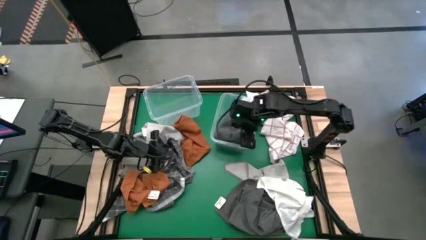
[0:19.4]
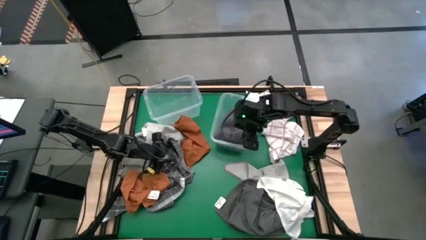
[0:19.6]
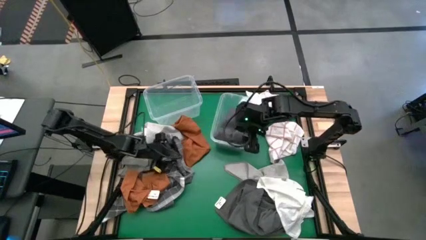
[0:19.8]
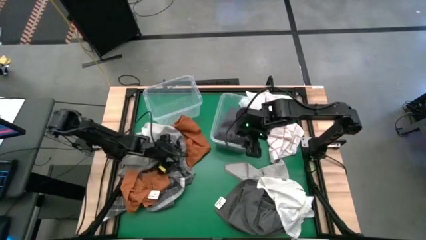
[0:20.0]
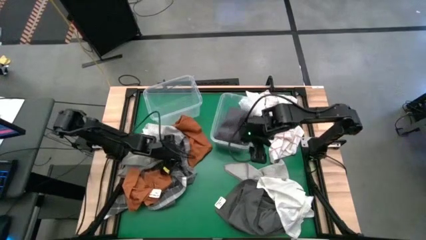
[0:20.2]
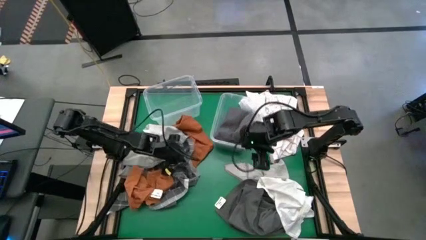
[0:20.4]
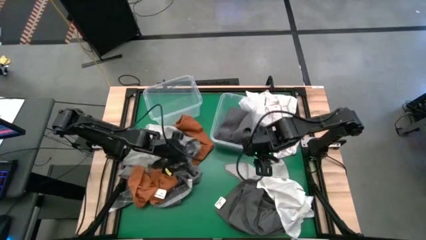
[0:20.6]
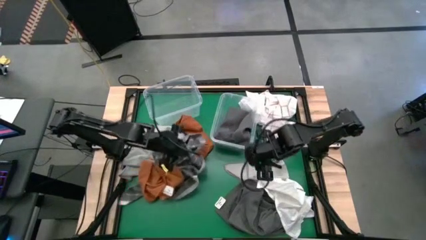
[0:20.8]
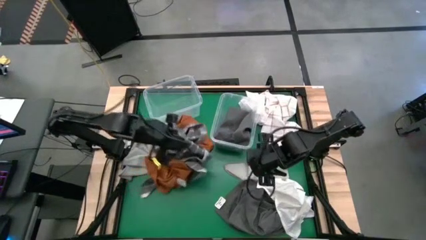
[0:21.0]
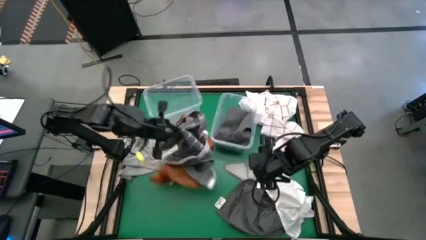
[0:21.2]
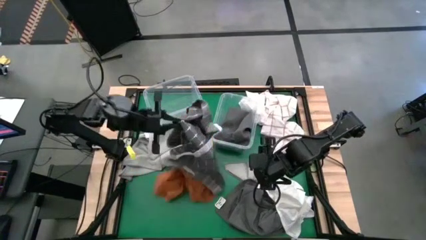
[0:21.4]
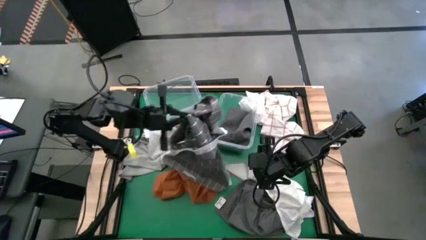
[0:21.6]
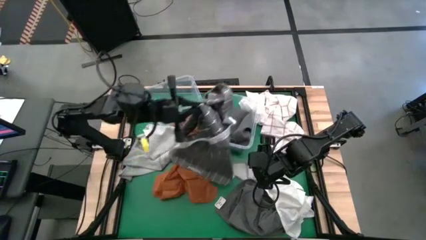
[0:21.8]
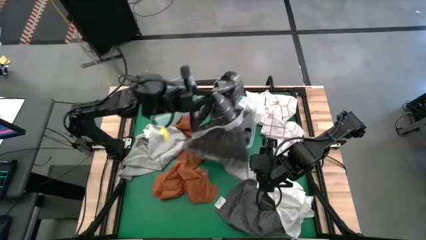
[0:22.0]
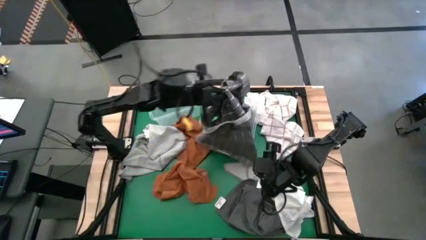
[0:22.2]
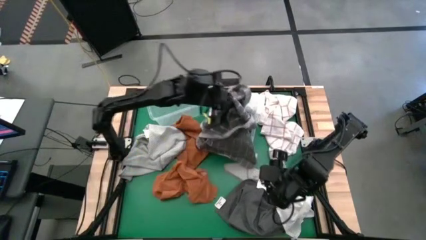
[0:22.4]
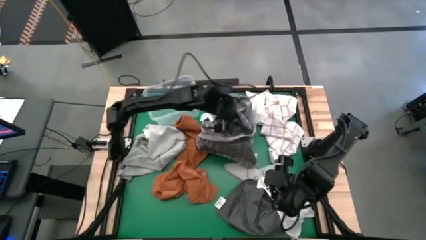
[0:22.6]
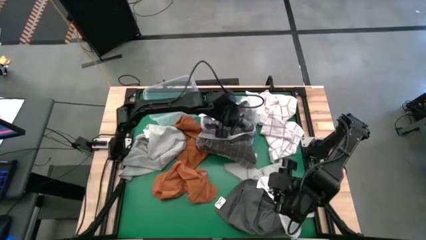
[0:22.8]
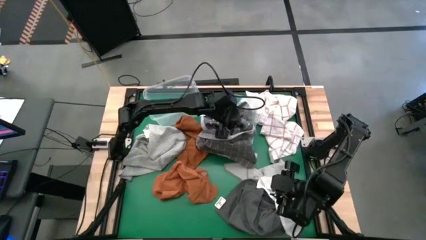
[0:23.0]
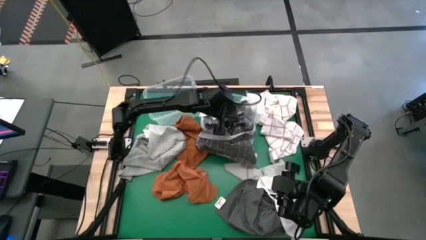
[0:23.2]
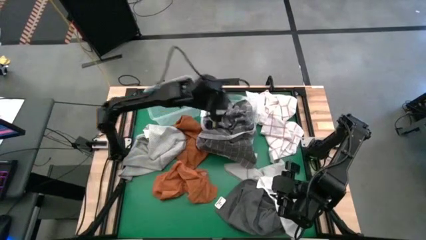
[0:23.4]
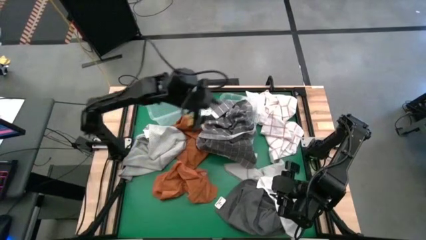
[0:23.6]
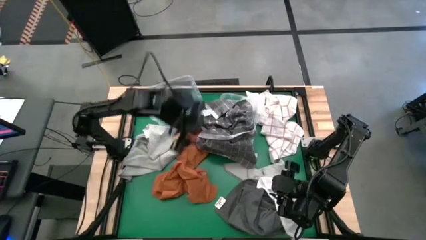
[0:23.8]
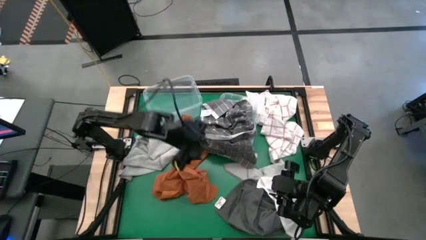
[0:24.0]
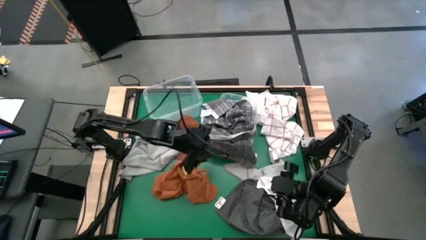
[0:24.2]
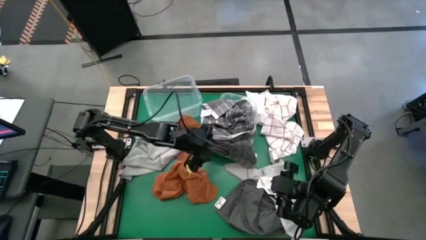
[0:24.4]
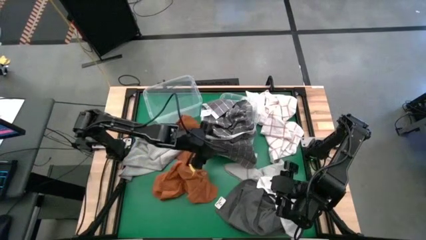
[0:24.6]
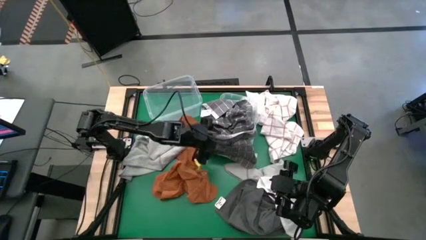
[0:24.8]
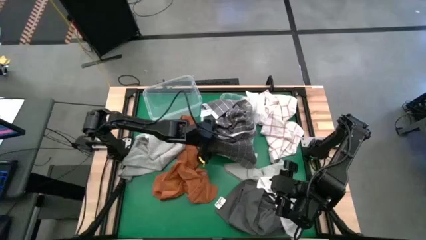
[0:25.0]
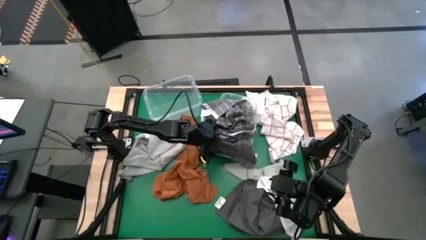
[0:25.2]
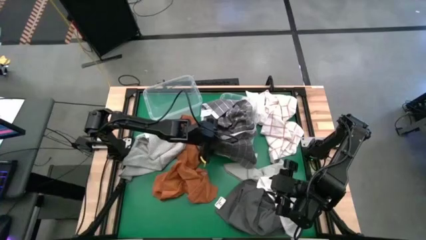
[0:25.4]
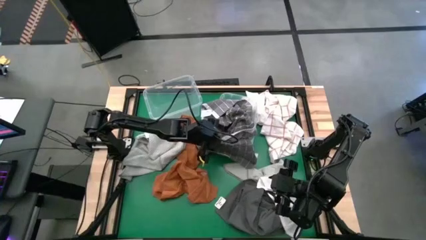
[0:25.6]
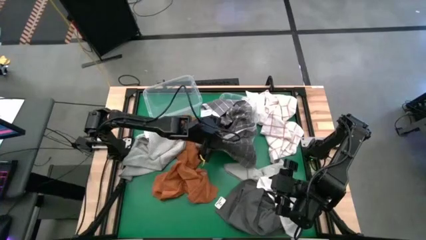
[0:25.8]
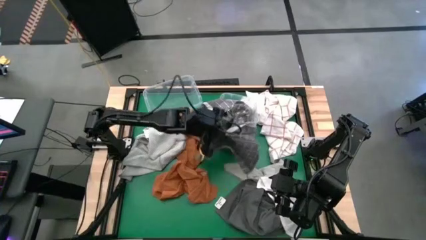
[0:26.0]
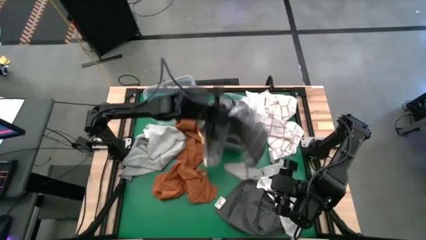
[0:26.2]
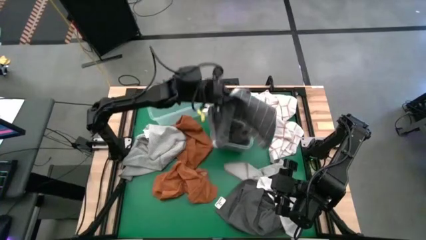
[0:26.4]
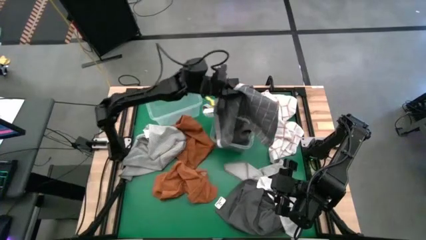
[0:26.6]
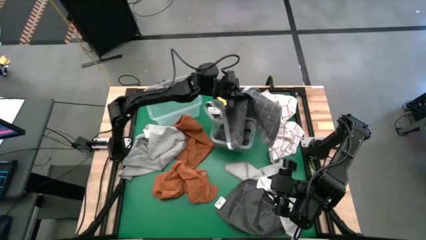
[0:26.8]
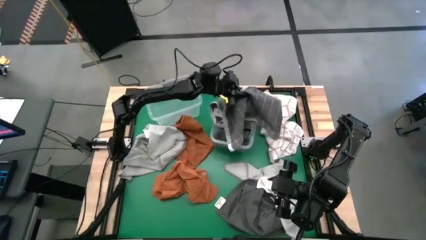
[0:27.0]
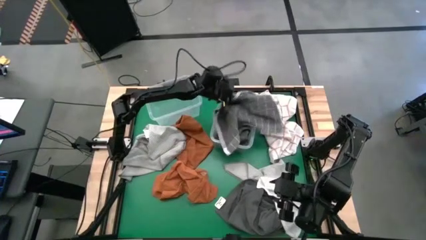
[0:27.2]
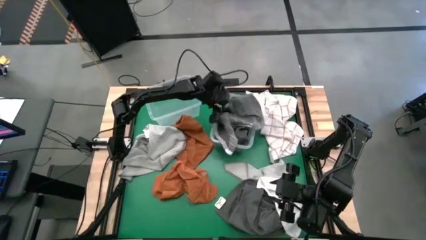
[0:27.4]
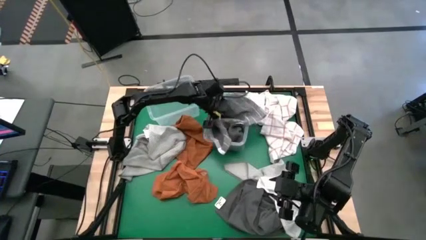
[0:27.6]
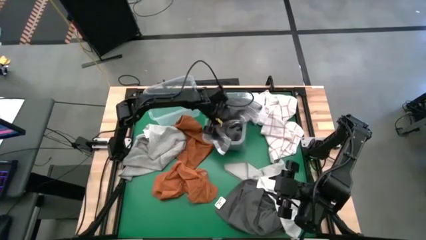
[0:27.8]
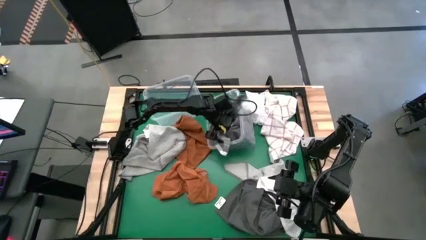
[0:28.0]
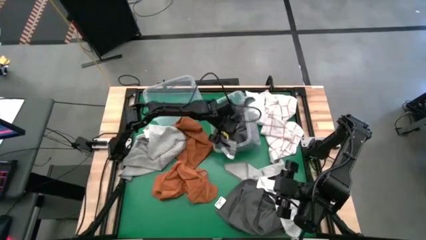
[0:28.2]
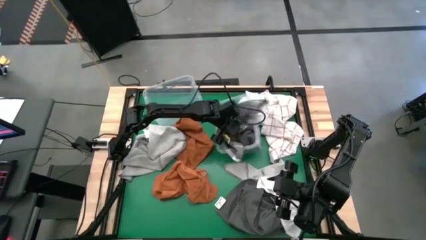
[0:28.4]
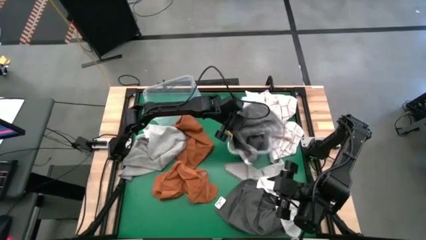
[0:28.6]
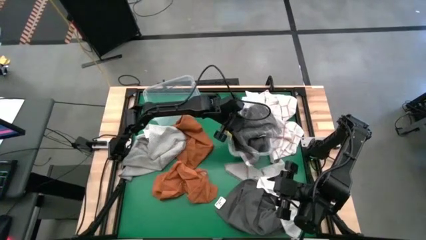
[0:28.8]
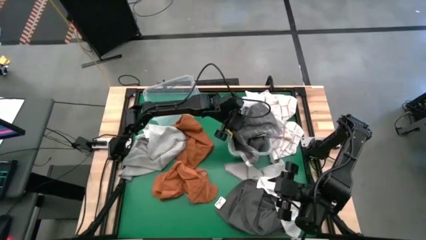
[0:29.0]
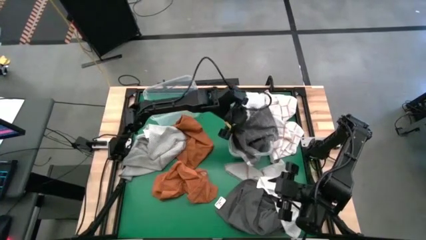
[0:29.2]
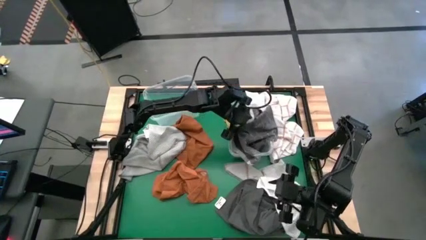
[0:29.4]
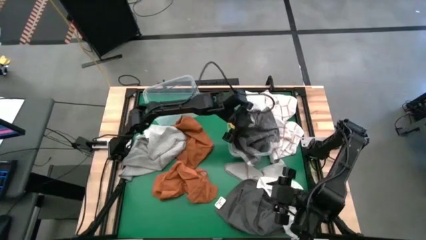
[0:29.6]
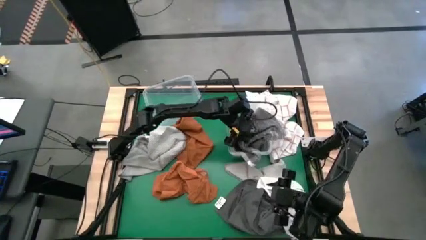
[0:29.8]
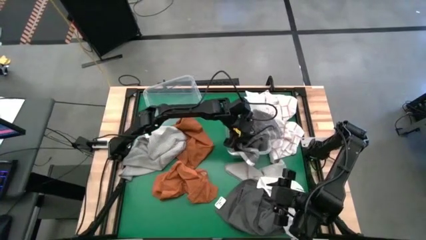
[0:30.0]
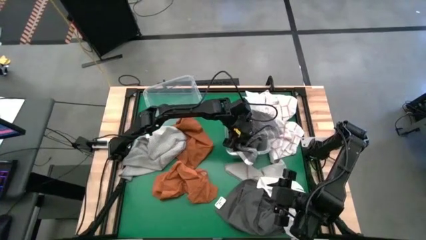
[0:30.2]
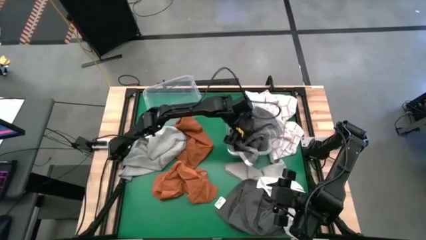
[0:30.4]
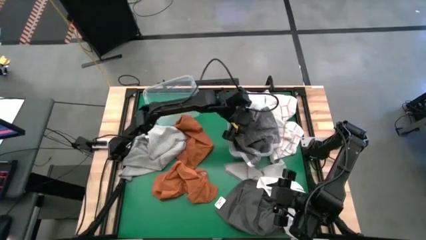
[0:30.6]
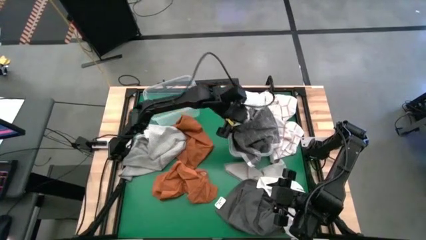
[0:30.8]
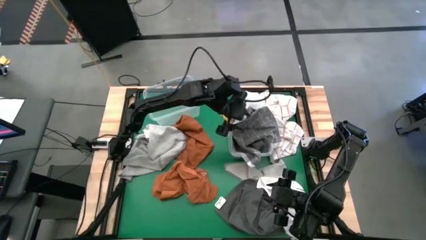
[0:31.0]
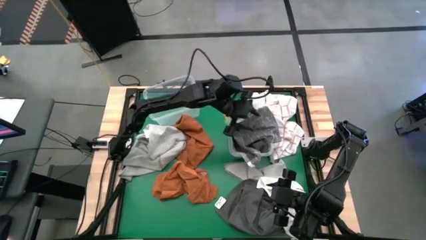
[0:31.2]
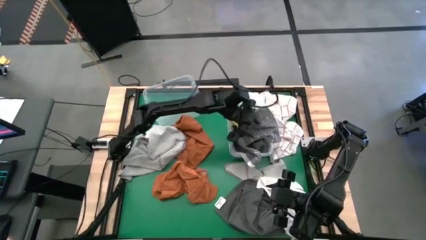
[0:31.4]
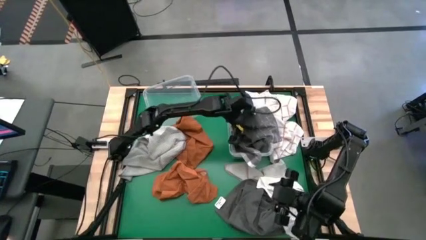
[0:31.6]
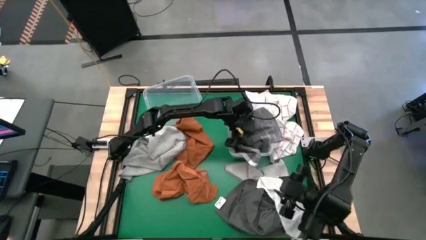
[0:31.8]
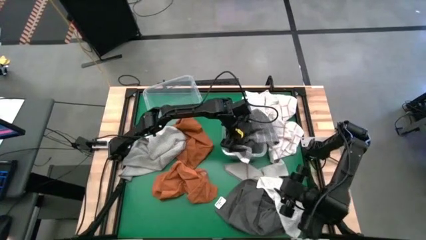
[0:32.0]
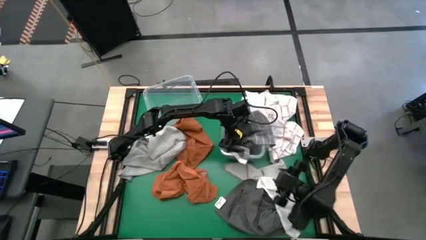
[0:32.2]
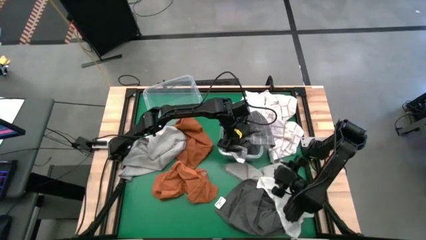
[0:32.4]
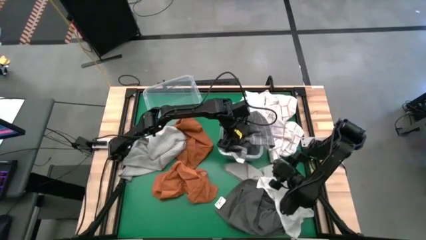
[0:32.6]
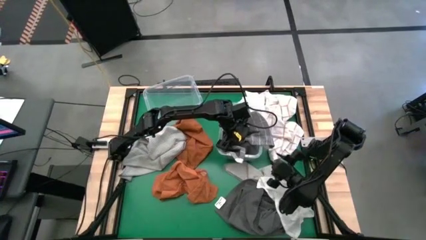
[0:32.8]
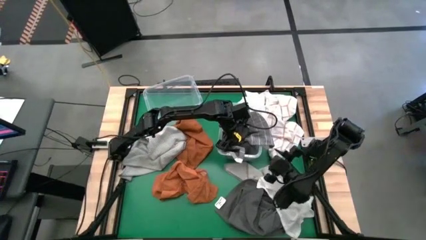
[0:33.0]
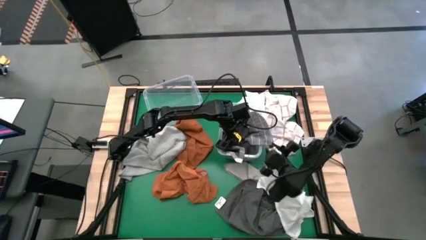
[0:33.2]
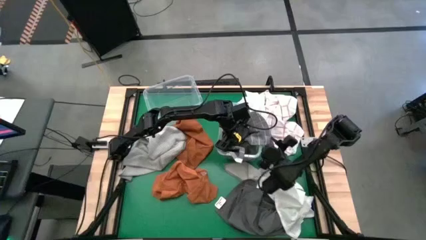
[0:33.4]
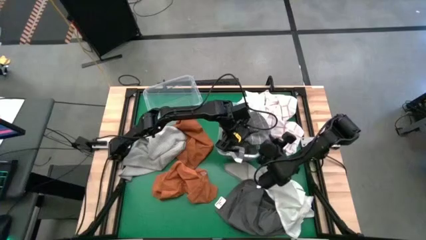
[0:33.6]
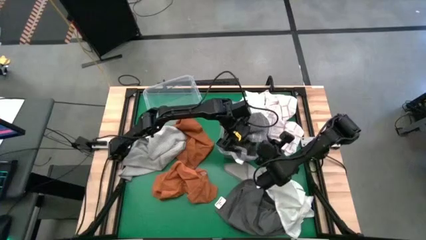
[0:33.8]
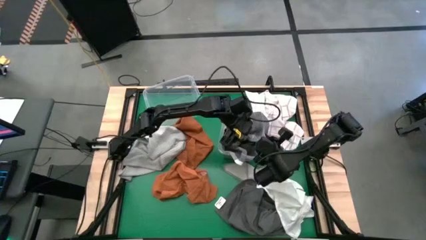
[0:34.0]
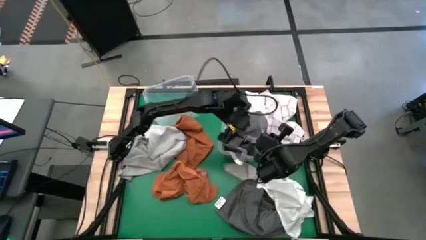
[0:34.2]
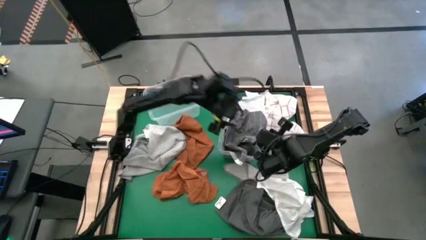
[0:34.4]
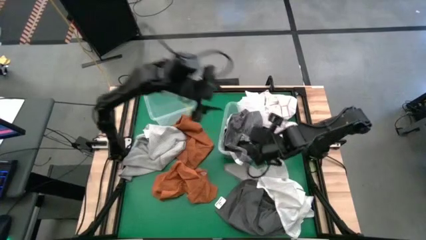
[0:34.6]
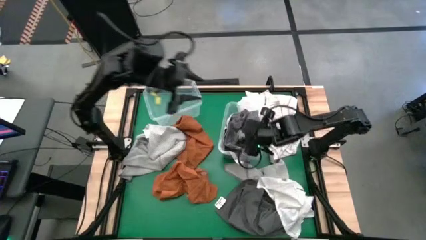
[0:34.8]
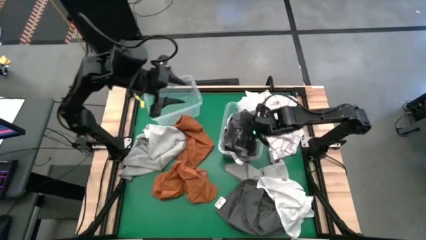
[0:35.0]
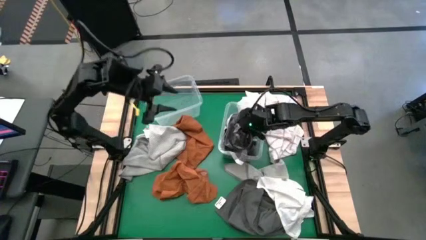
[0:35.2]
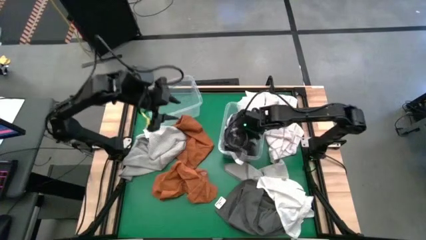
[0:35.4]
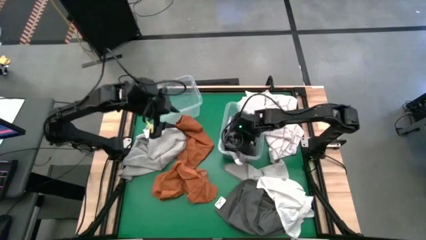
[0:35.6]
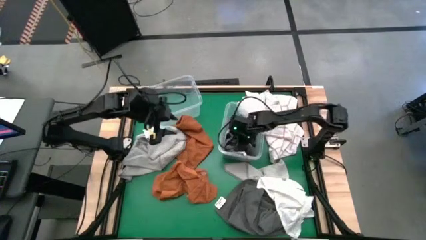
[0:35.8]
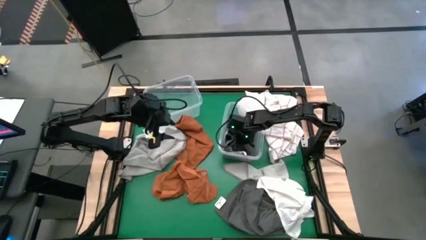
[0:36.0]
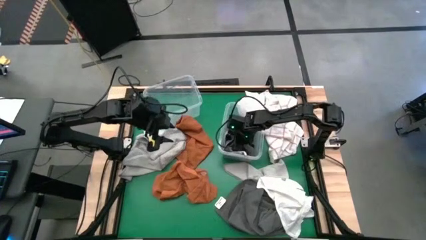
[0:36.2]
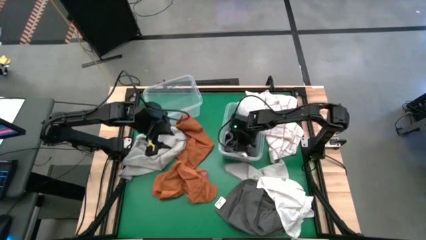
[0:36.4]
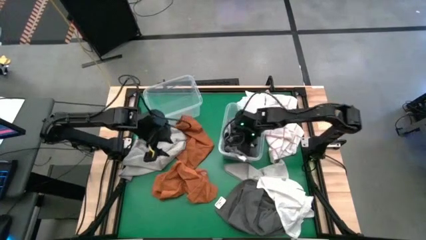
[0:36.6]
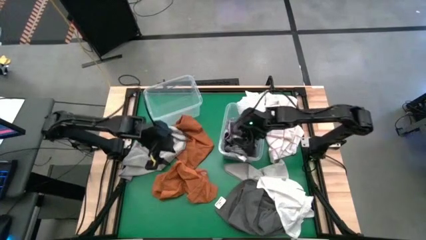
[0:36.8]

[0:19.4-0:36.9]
Task: Sort towels by color in basket
Put the dark gray and white towel into the right transparent bin
